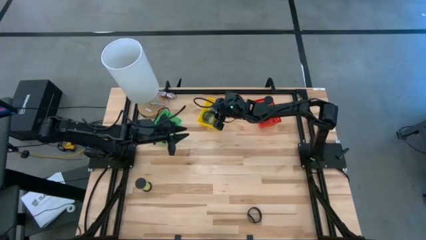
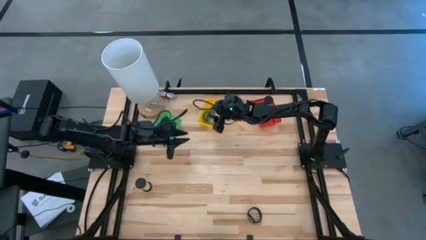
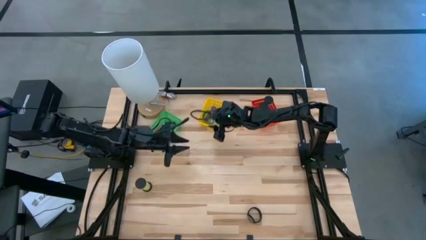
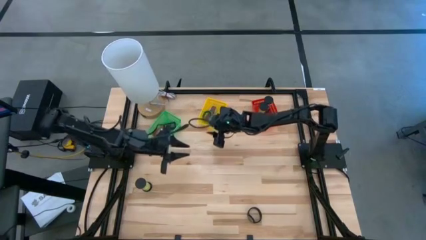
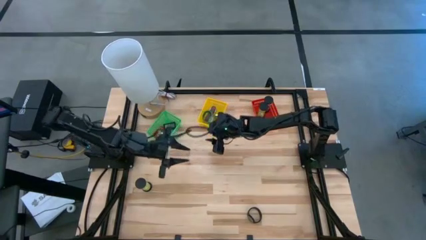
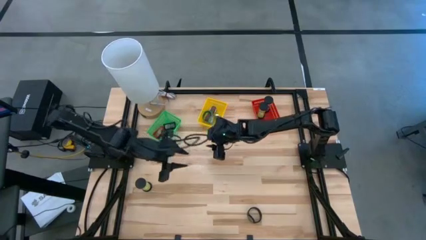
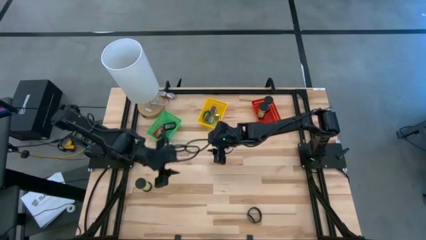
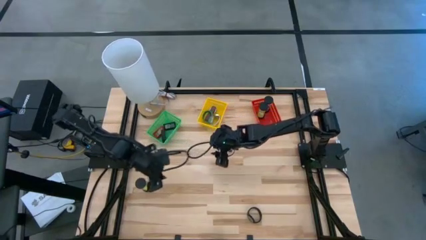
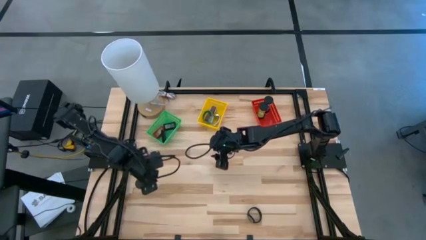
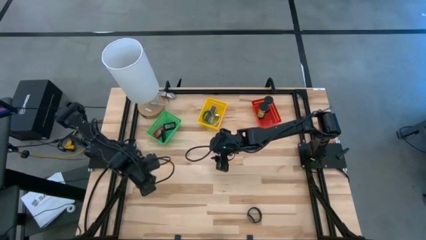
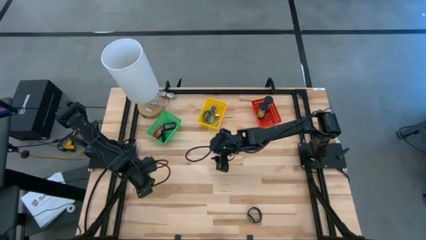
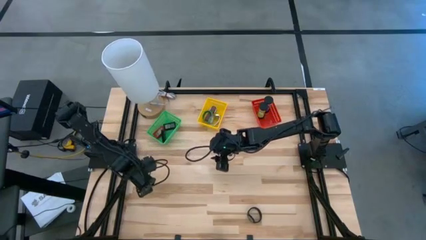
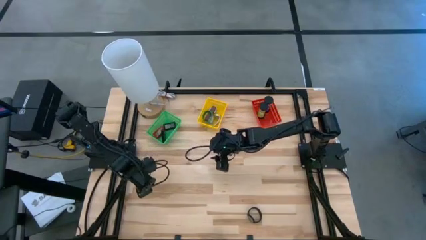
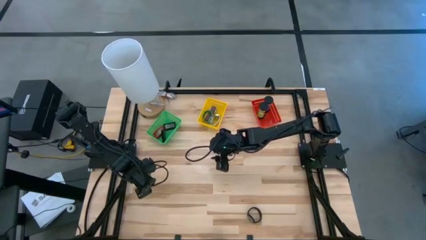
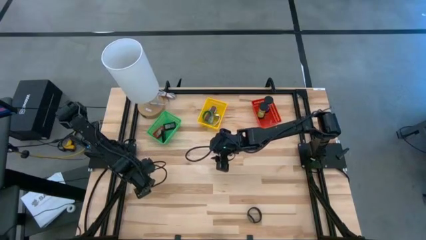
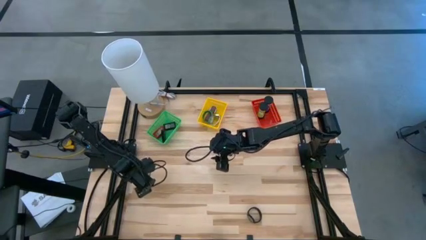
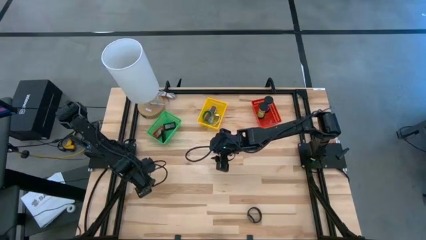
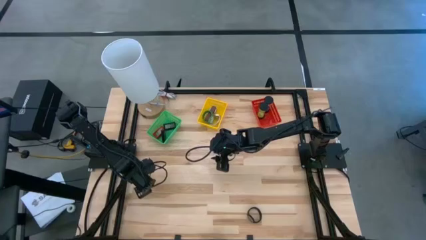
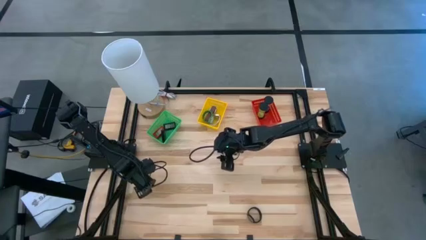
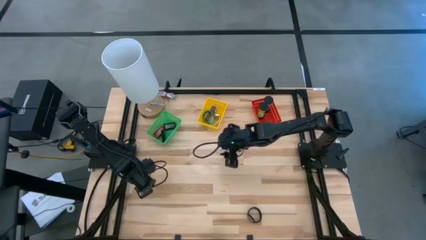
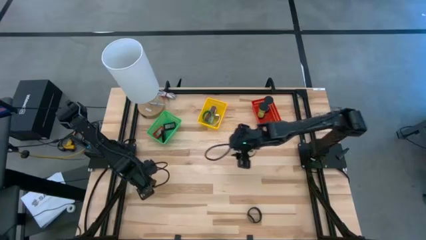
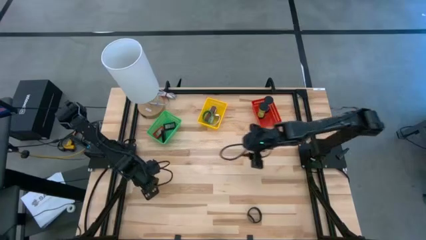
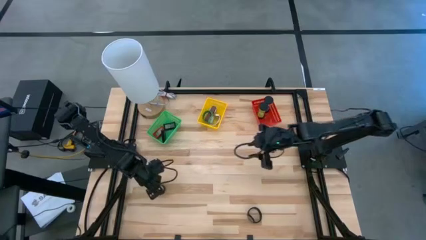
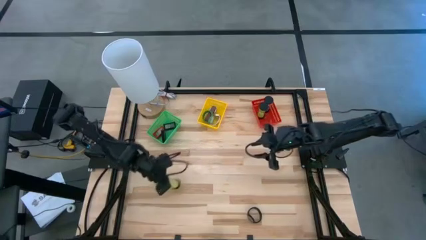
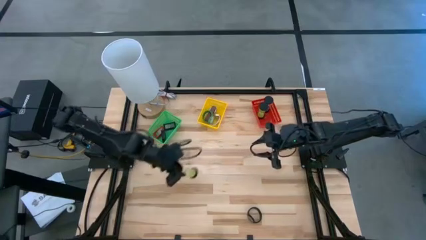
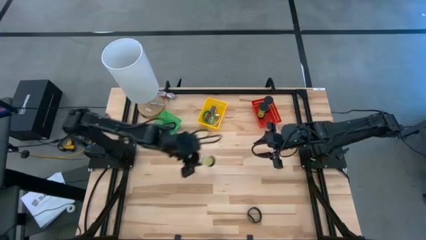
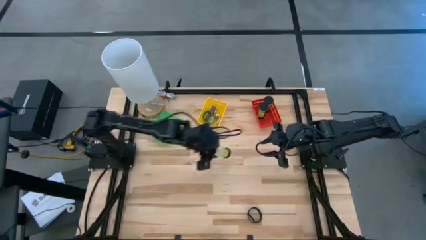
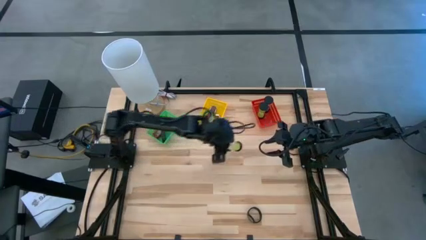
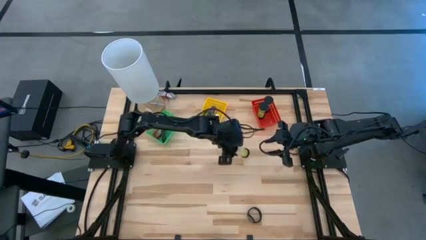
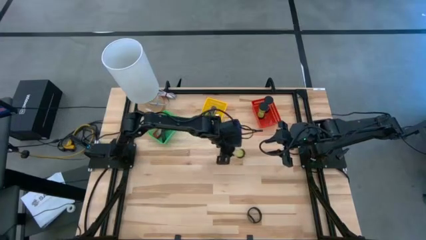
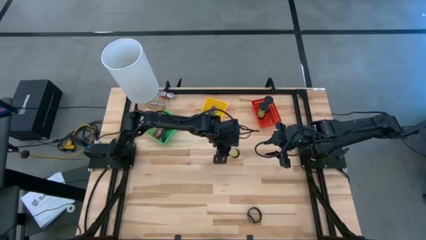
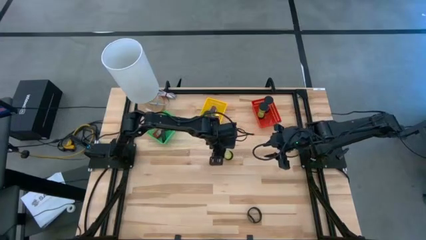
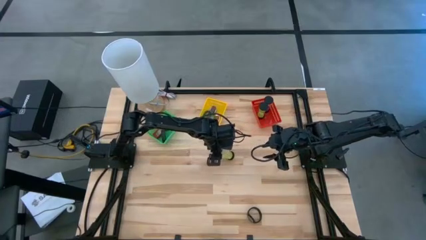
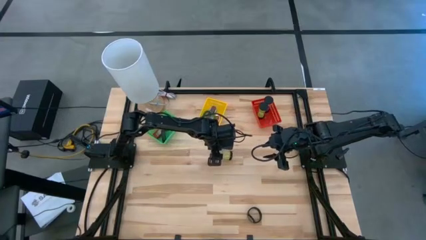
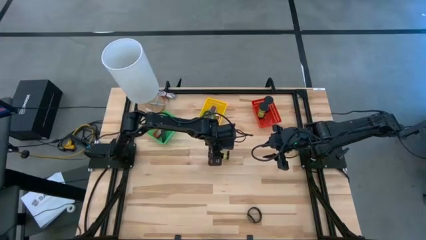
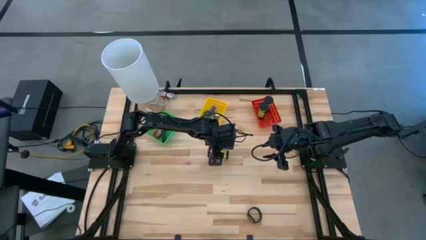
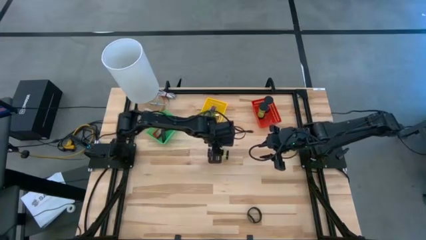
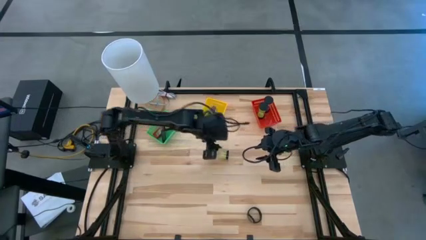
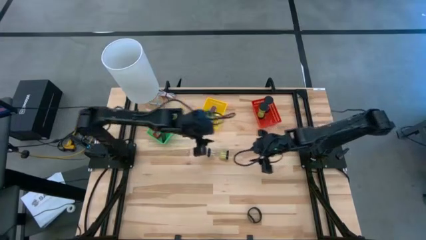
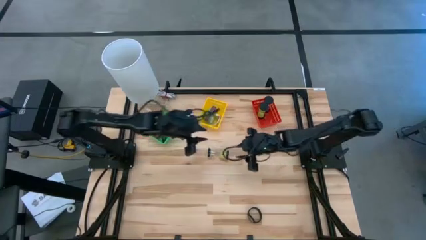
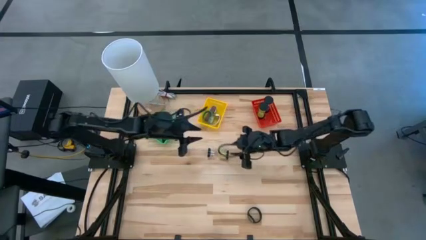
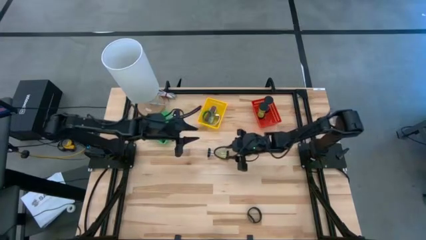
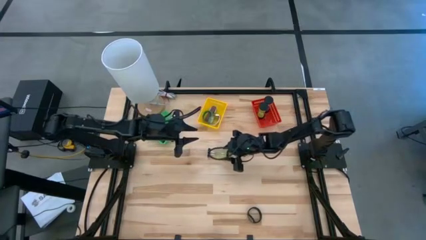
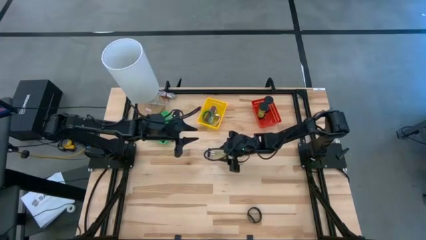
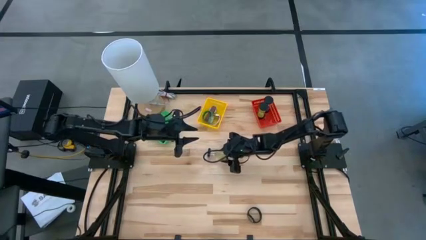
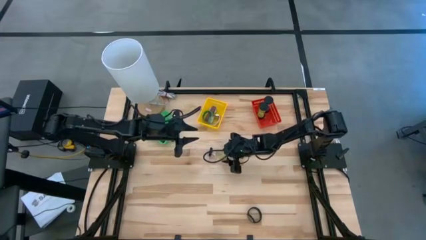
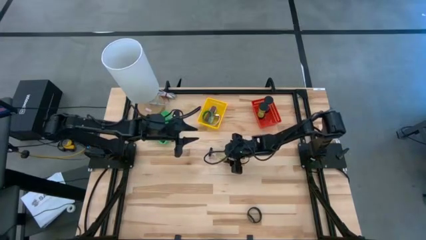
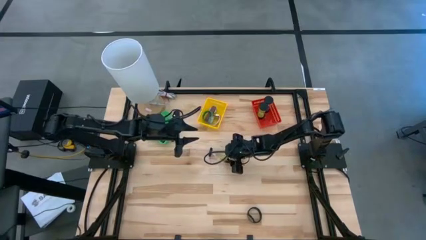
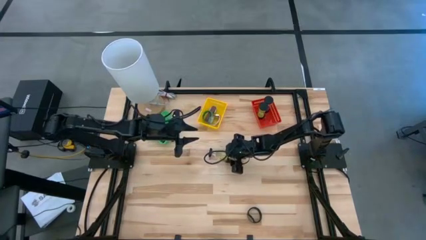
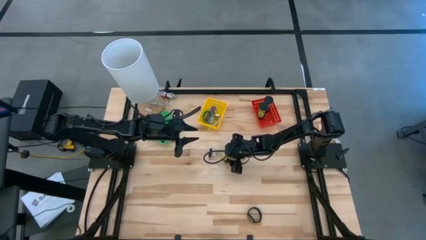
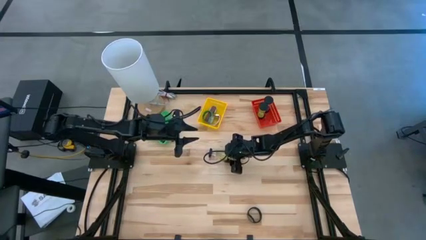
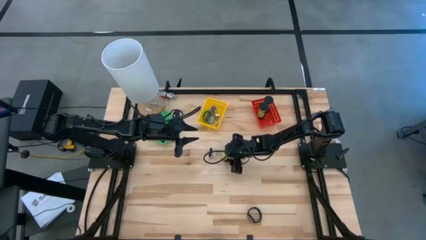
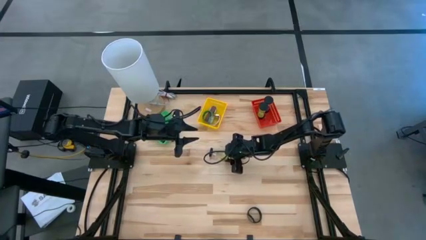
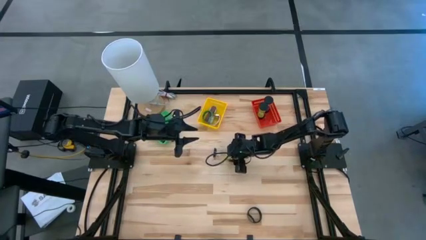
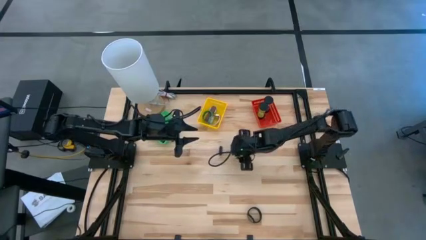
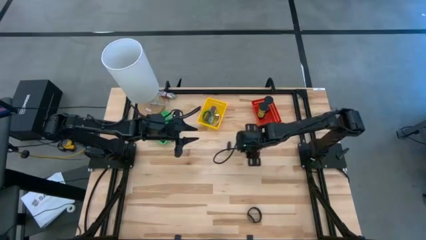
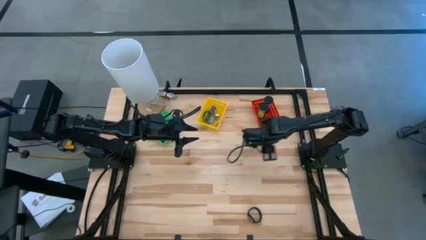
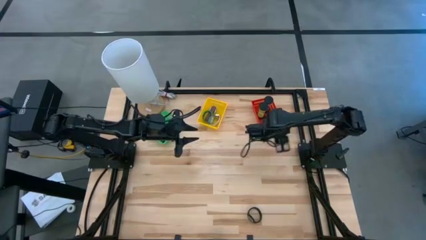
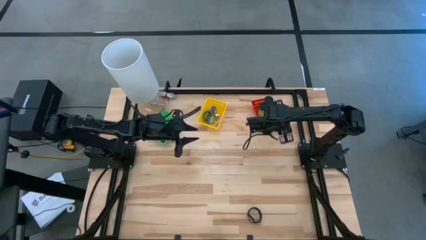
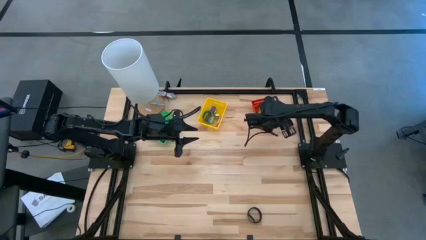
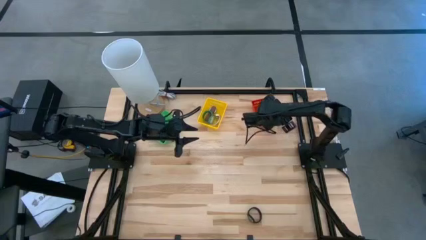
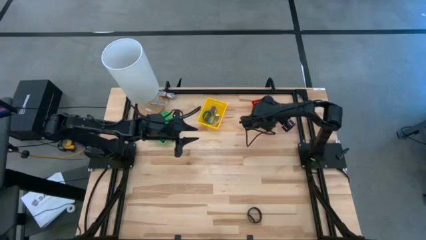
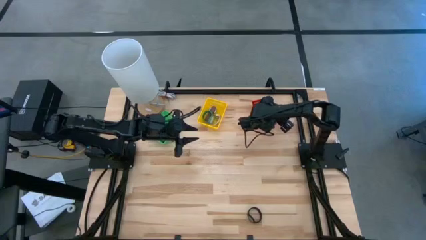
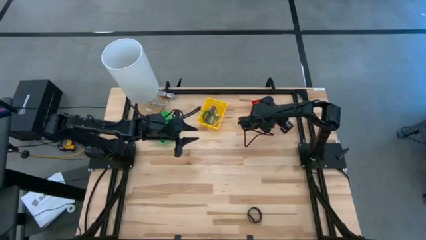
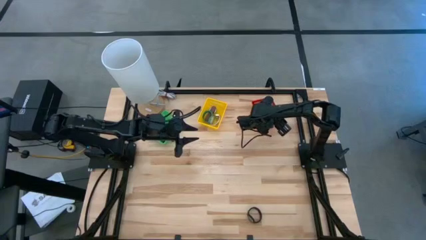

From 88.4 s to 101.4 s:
Task: Pick & Place Office items
Put the yellow hourglass into the red bin
